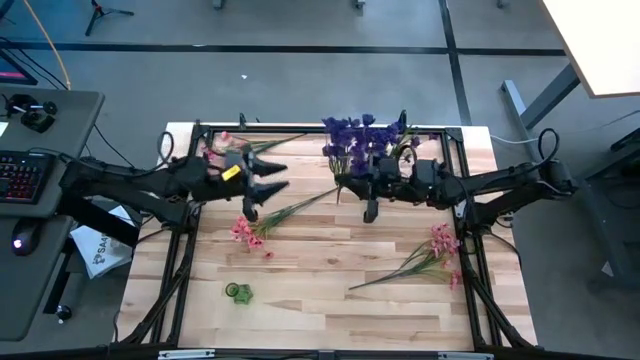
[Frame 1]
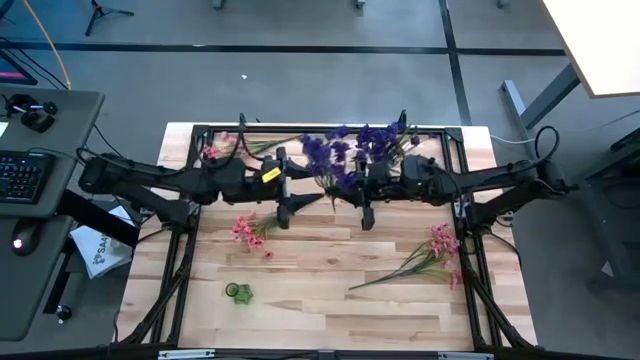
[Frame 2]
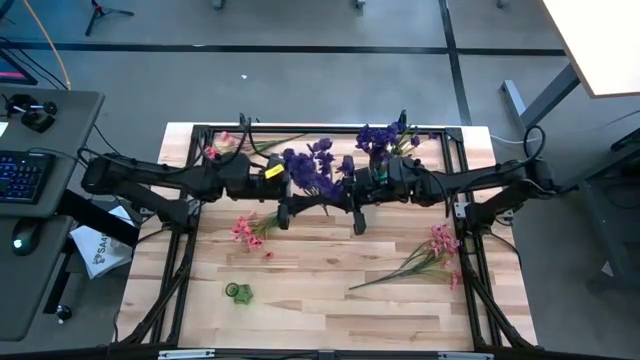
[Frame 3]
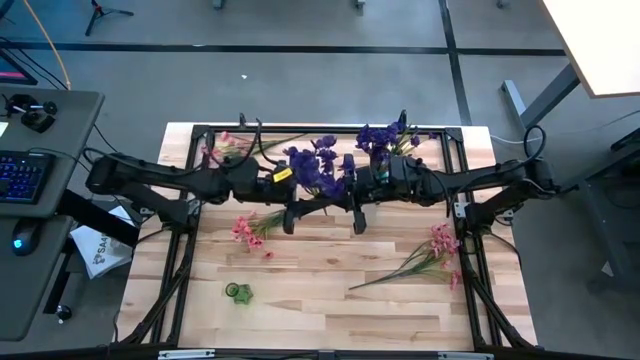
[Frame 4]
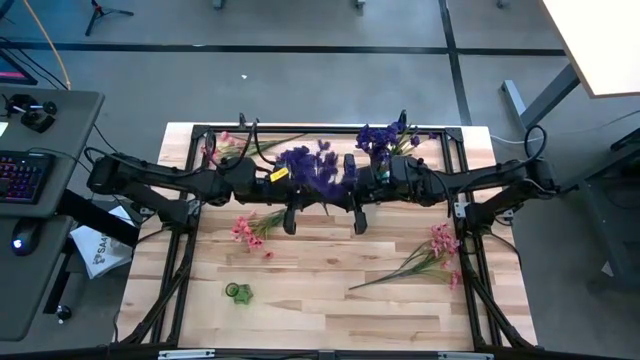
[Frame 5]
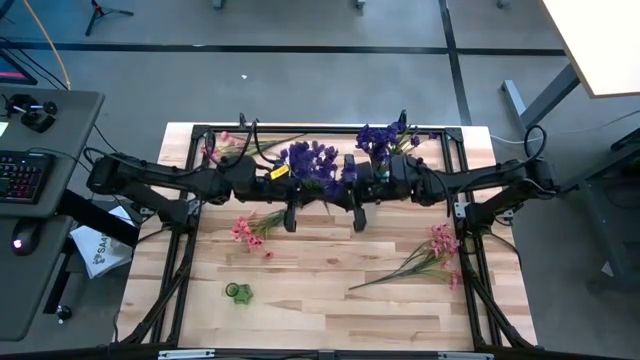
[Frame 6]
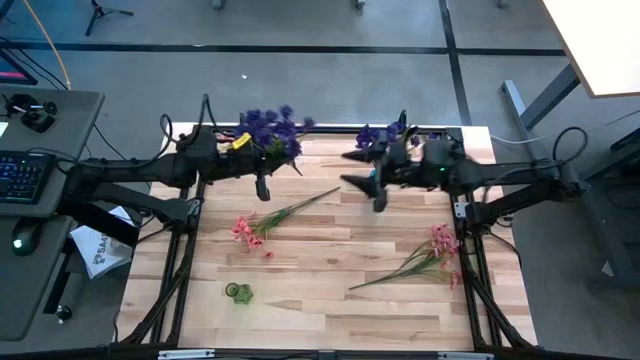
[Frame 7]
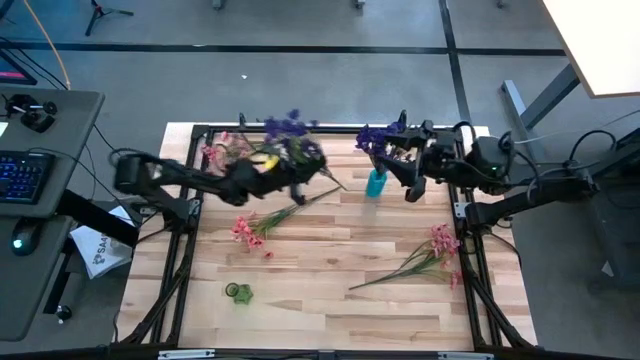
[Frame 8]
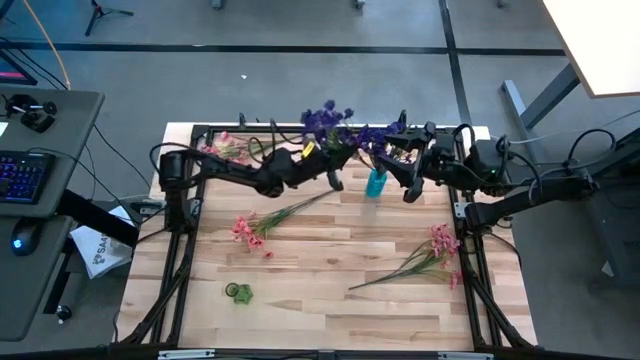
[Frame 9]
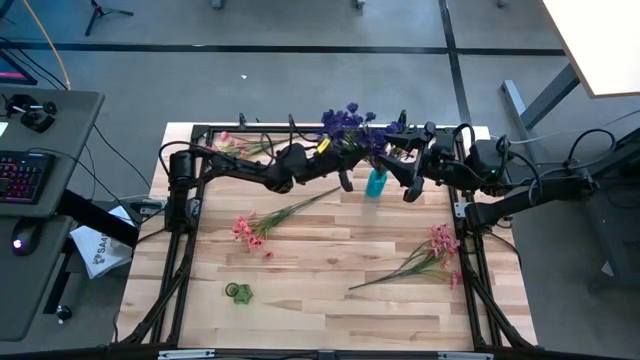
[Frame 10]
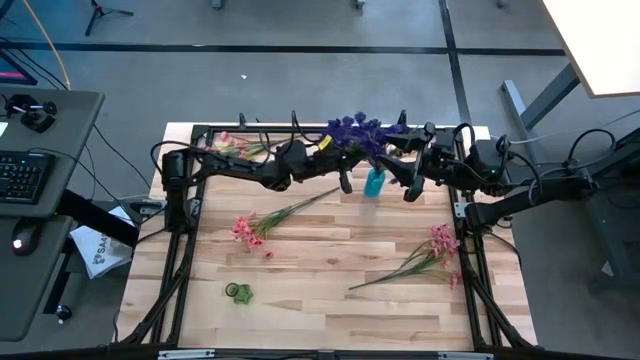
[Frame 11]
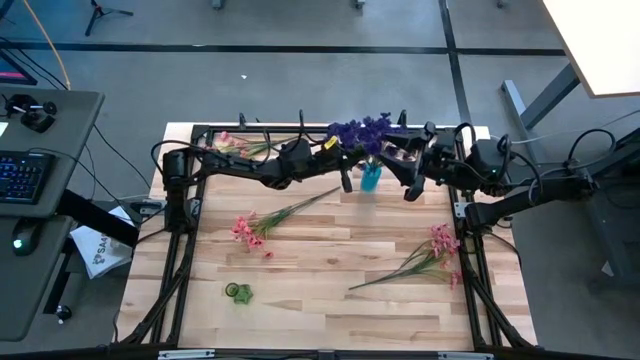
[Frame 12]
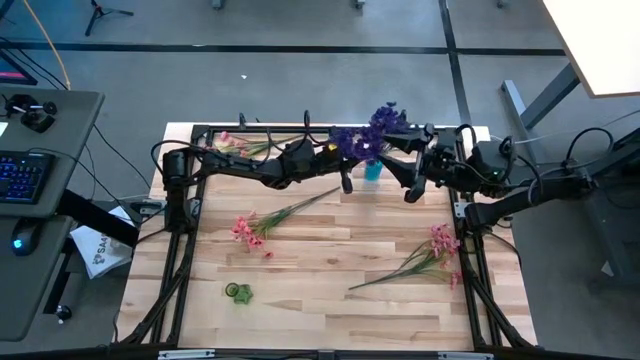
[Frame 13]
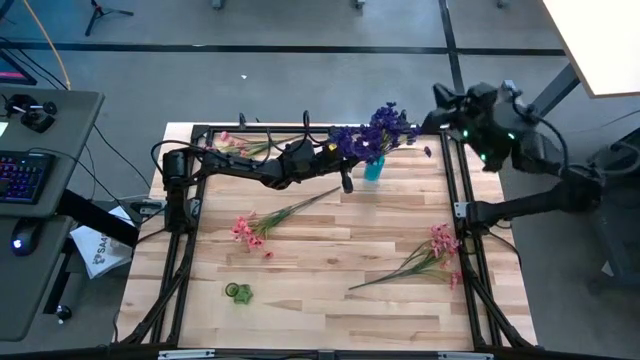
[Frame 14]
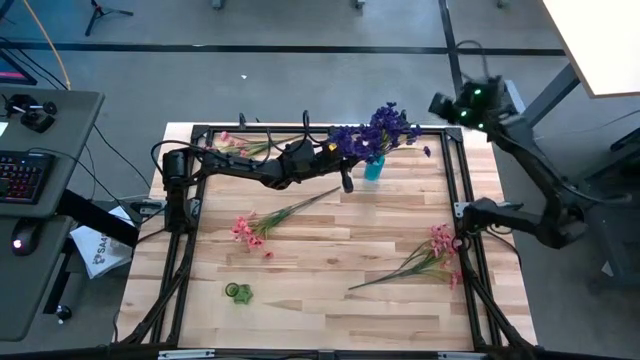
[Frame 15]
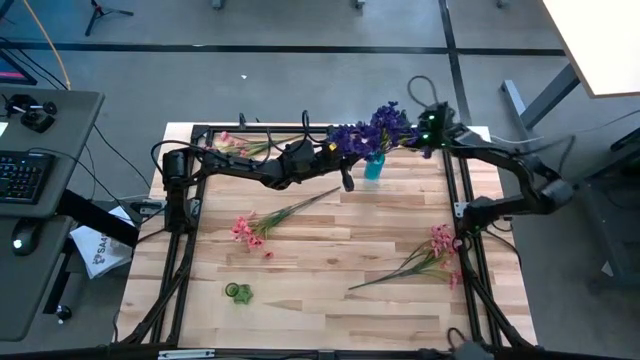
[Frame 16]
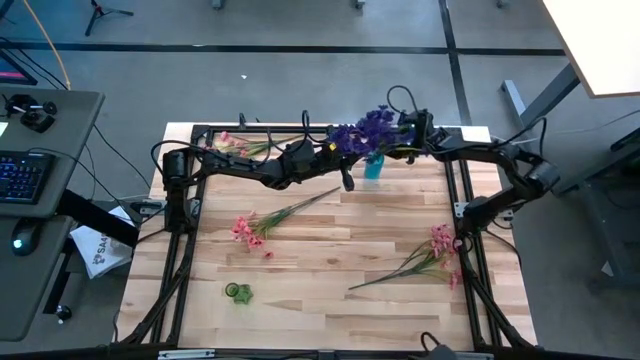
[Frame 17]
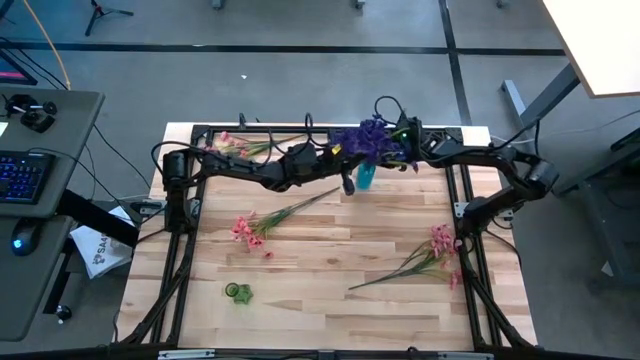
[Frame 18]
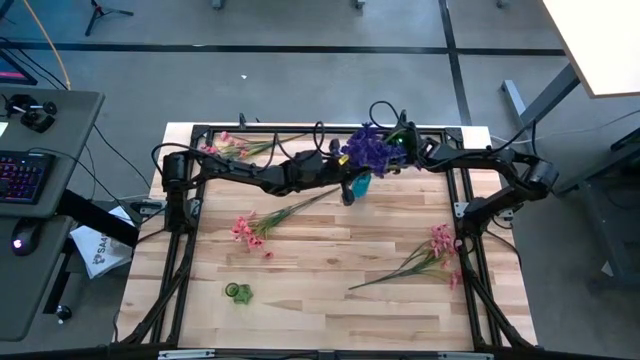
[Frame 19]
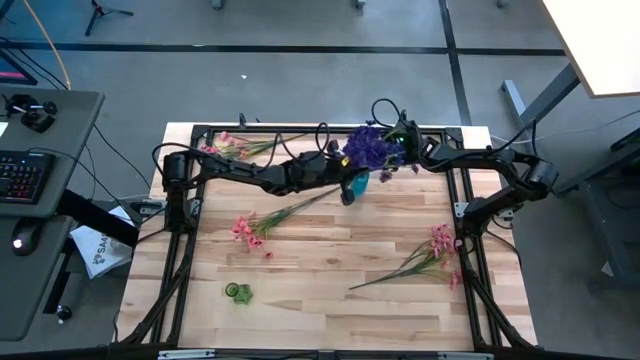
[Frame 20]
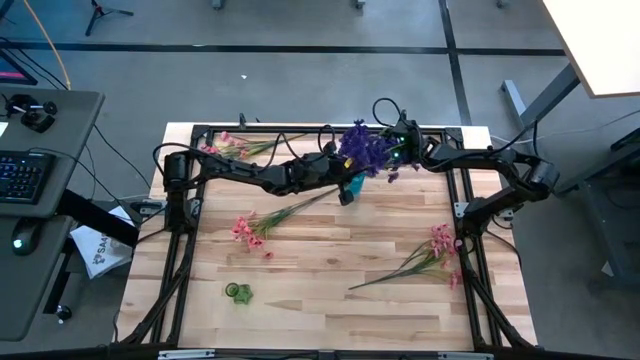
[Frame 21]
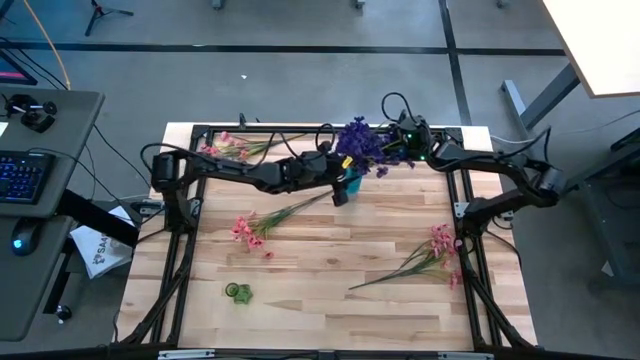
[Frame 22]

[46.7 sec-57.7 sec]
Task: Sort flowers into vase by color
Put the violet flowers into the blue vase
